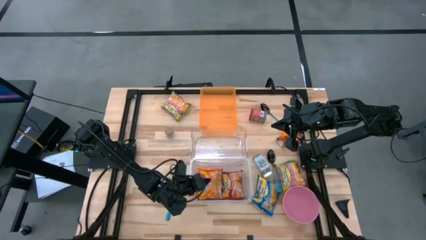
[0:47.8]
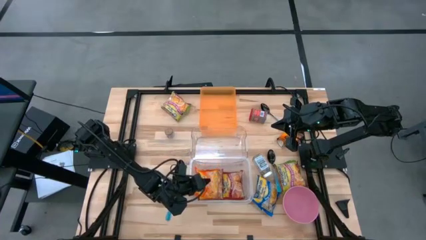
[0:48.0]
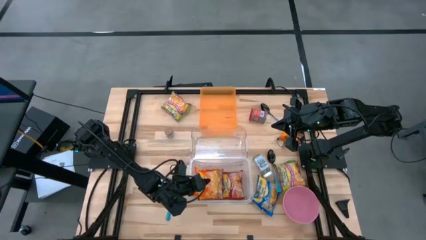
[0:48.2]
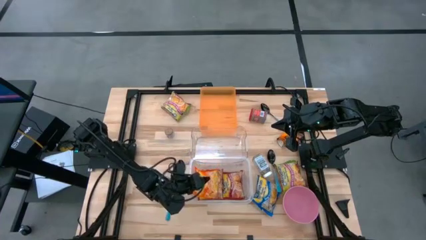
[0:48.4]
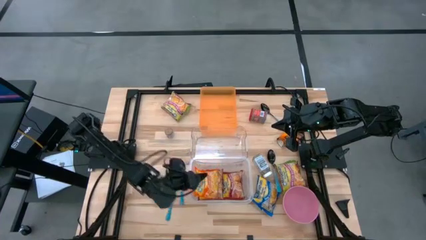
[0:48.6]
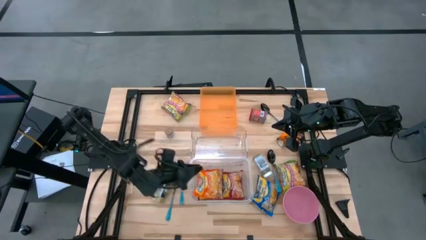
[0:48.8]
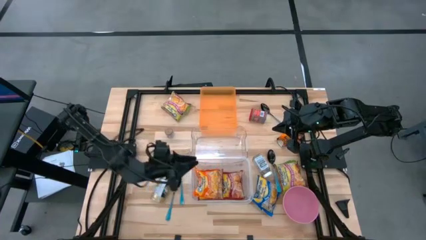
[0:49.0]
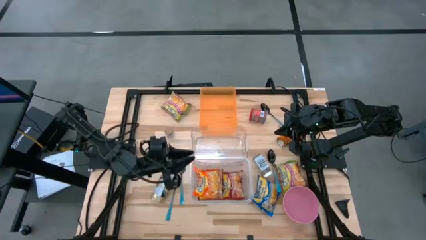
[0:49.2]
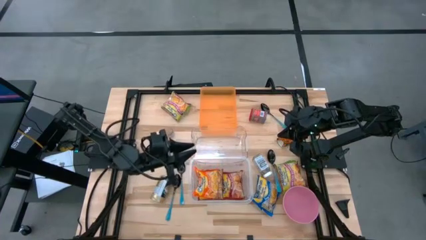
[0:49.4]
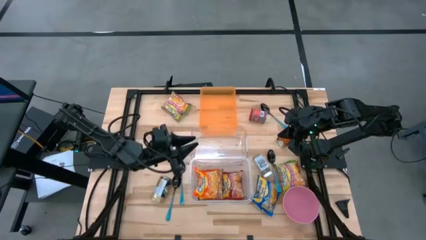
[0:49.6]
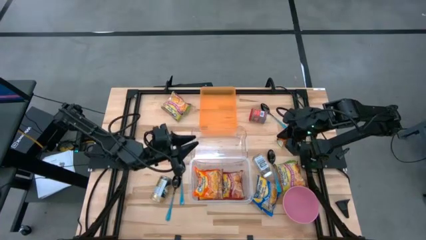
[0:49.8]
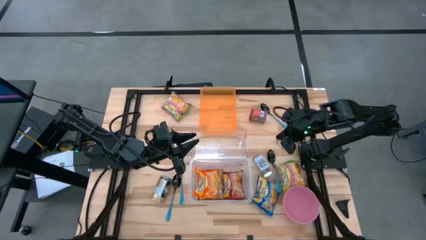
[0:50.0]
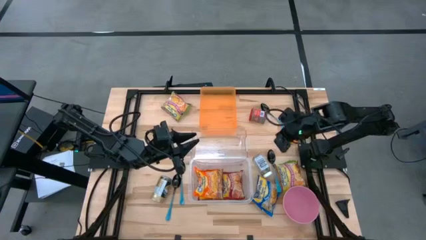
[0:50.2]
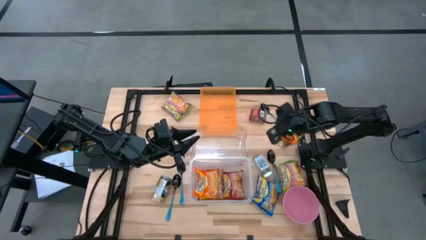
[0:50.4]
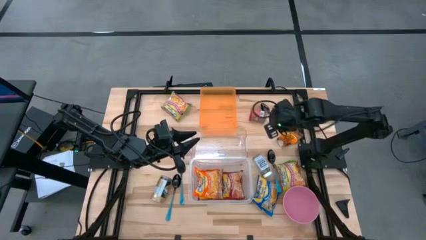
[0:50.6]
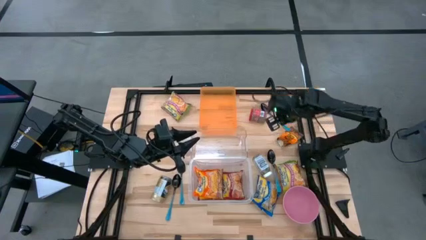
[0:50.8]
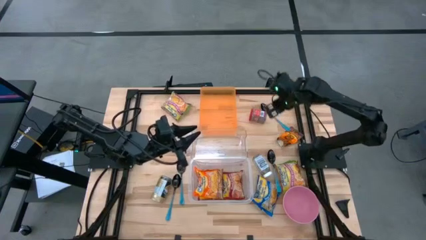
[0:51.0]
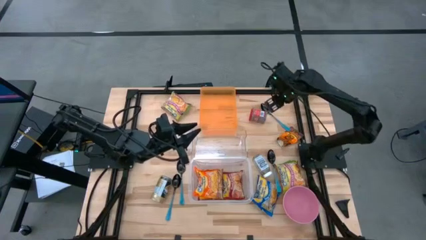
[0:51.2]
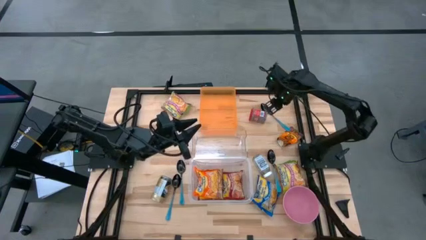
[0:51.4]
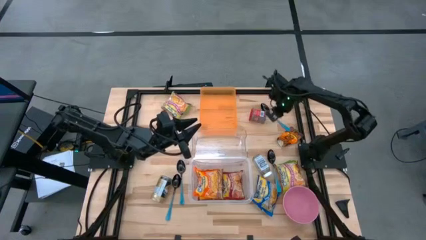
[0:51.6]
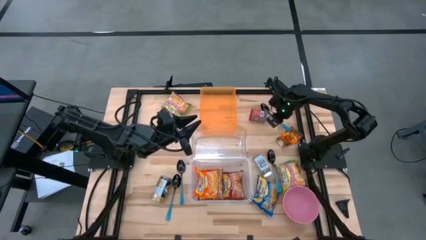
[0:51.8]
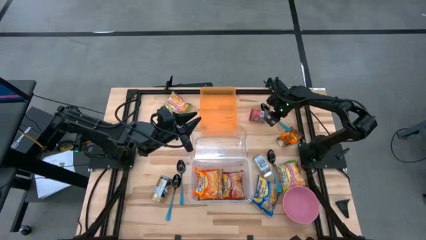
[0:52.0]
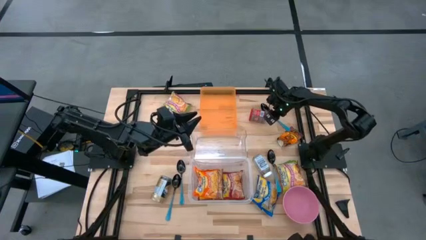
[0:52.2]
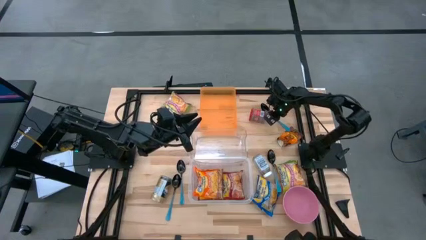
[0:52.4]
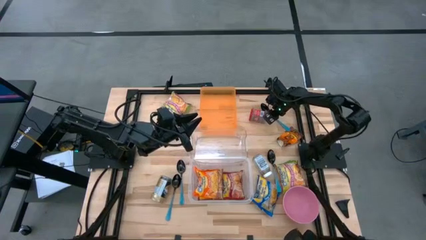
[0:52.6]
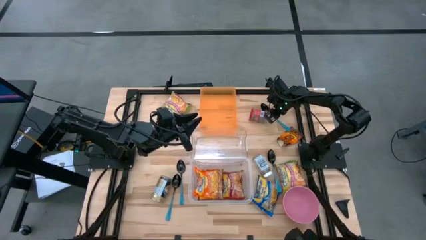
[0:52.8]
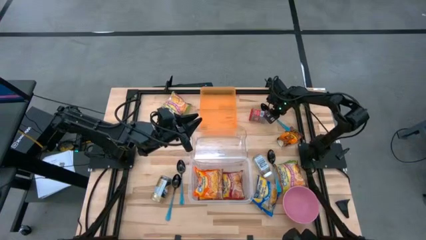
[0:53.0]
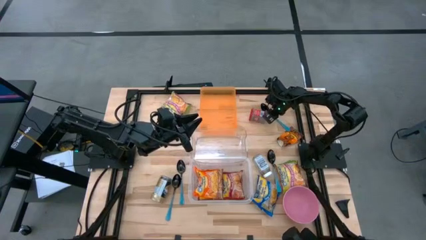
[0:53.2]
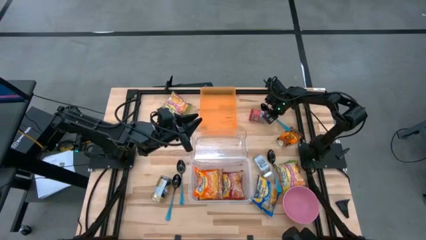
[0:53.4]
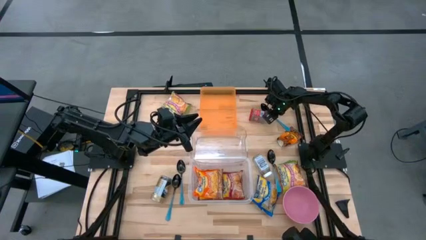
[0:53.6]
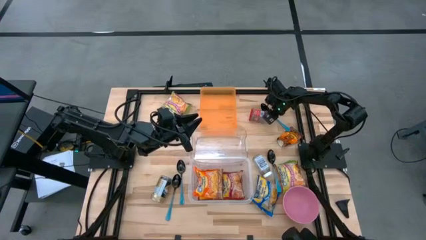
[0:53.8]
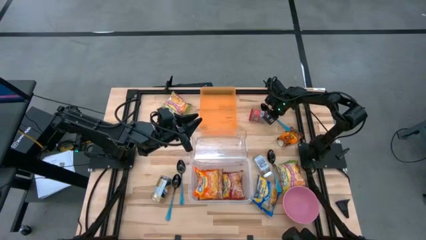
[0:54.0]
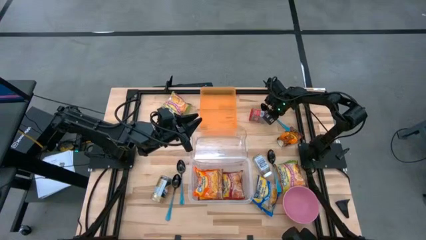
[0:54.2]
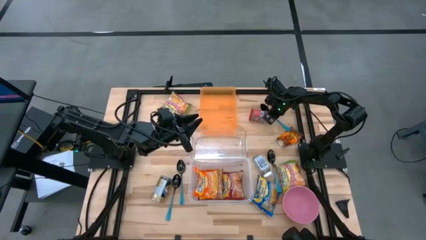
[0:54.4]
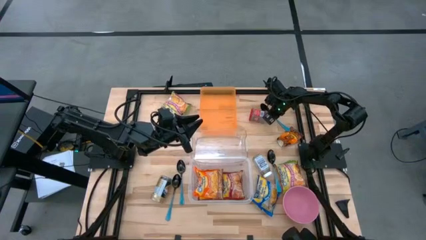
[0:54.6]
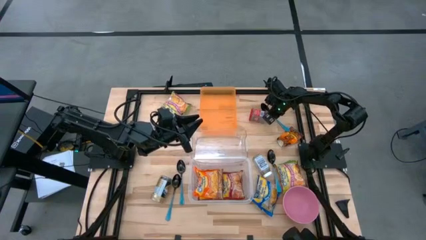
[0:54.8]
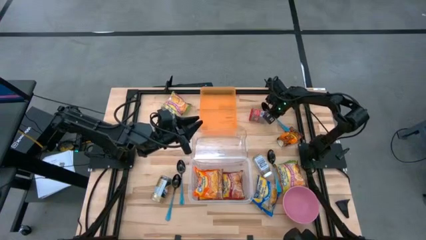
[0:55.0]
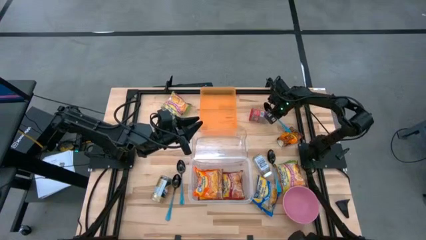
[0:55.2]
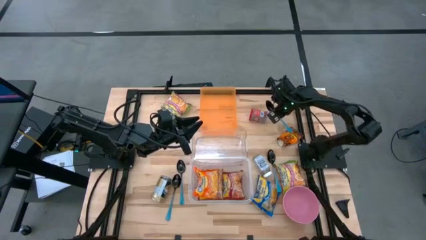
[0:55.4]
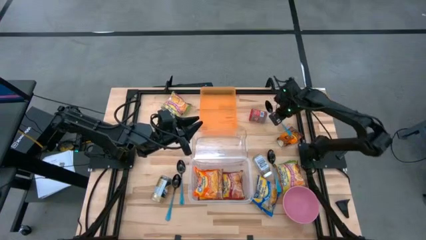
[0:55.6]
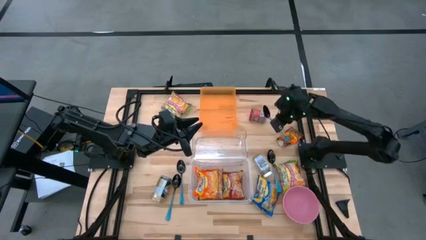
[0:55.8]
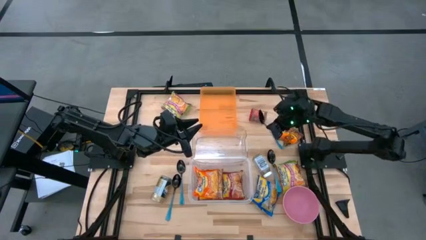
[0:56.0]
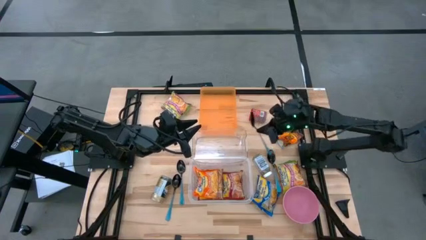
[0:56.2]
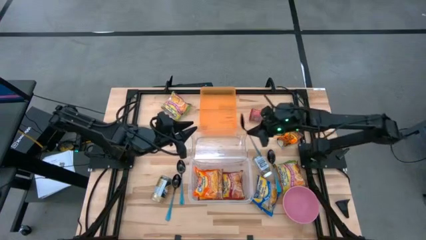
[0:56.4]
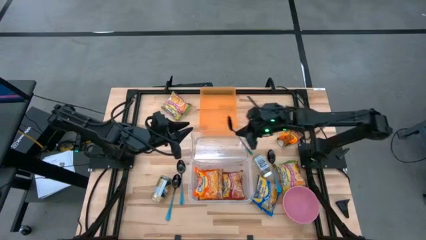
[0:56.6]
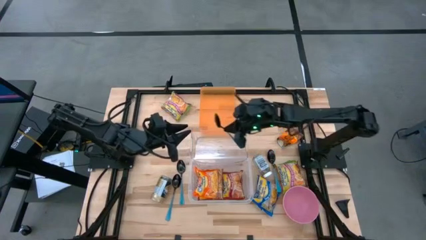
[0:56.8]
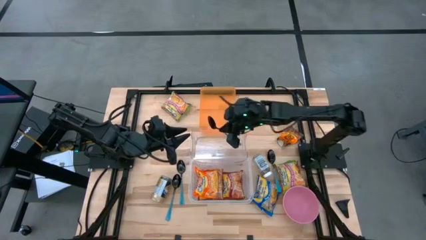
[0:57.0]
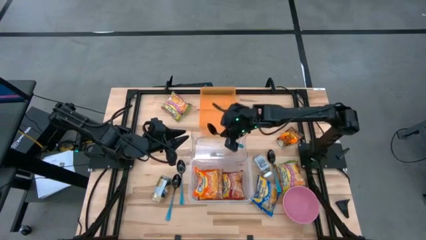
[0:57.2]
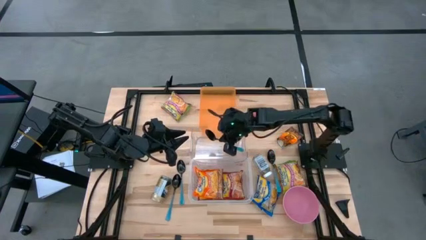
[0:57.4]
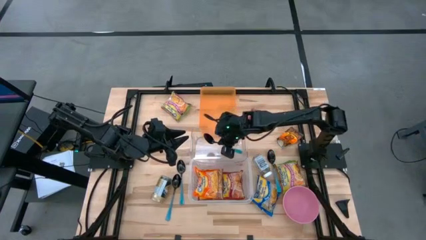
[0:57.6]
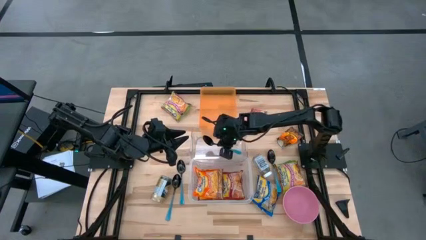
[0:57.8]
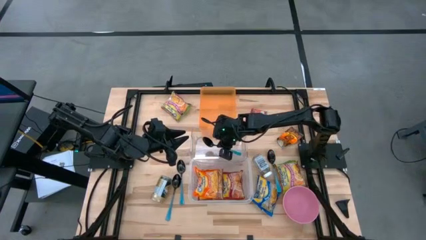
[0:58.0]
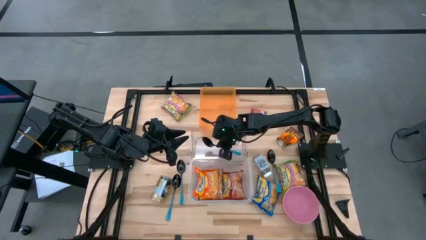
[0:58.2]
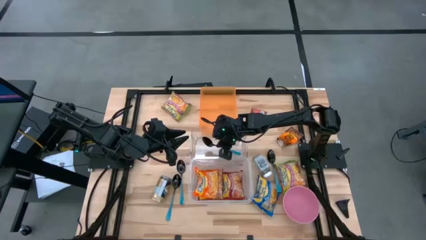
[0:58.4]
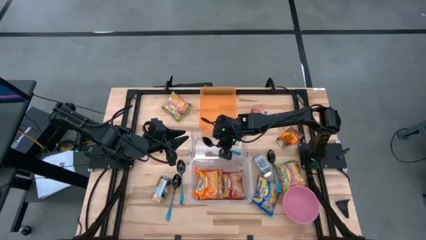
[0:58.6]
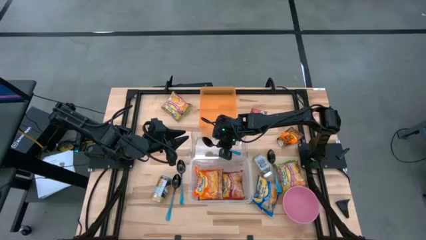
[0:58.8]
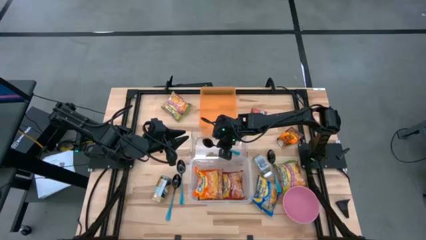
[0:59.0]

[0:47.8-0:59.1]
Task: Pick & Place Food Item
Put the blue spoon into the transparent bin

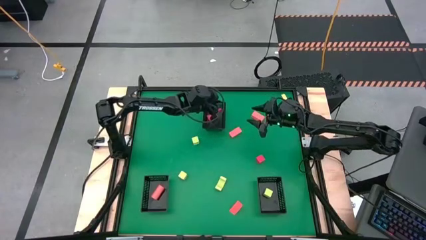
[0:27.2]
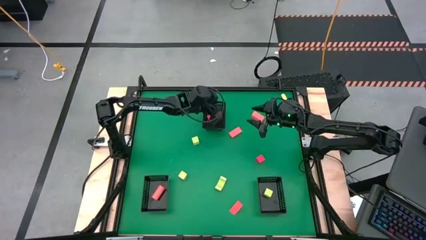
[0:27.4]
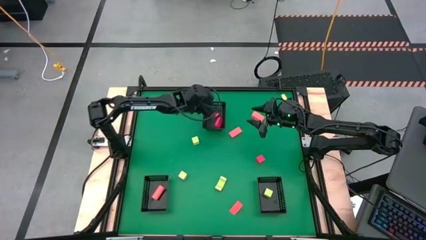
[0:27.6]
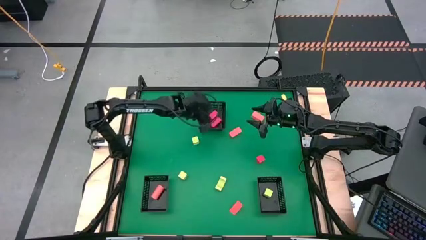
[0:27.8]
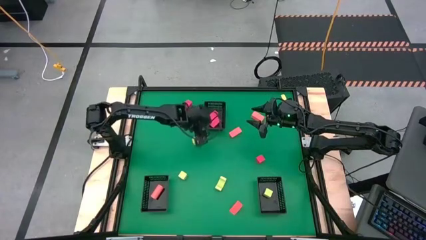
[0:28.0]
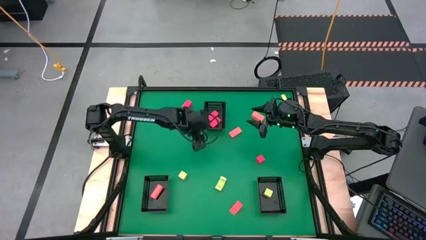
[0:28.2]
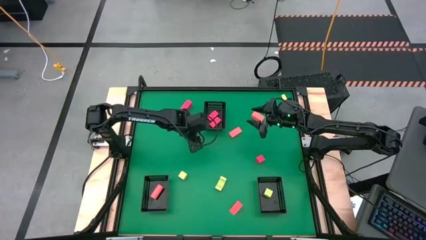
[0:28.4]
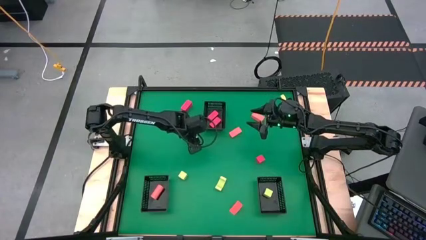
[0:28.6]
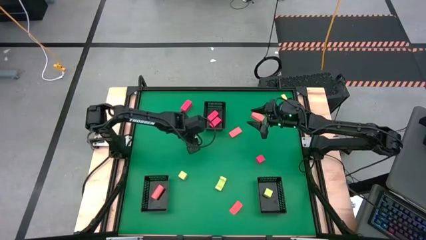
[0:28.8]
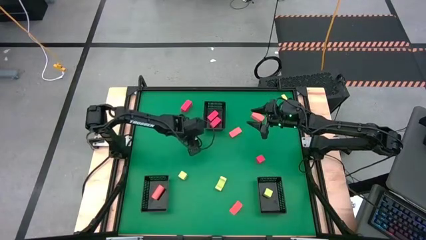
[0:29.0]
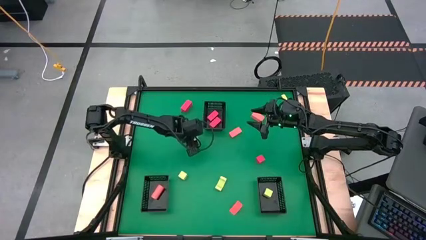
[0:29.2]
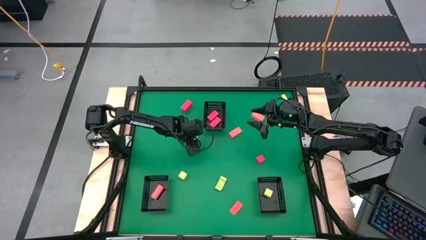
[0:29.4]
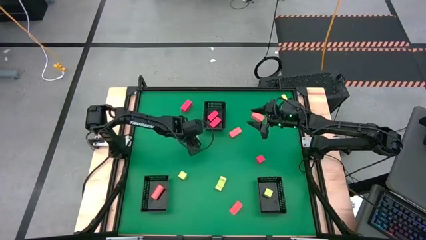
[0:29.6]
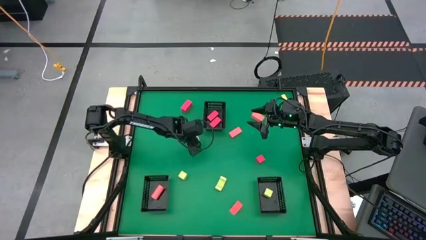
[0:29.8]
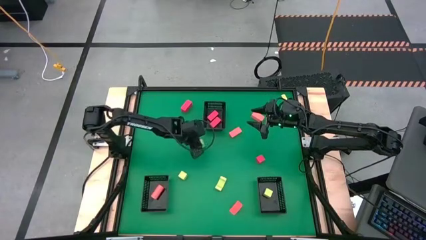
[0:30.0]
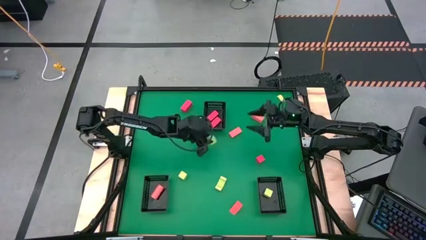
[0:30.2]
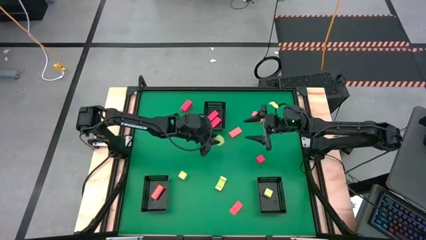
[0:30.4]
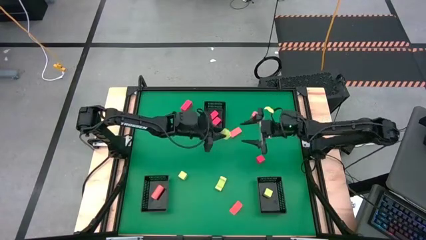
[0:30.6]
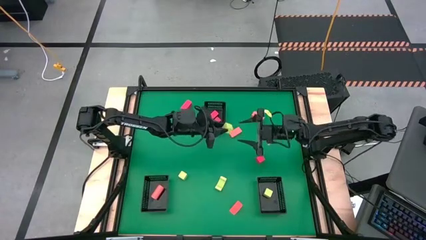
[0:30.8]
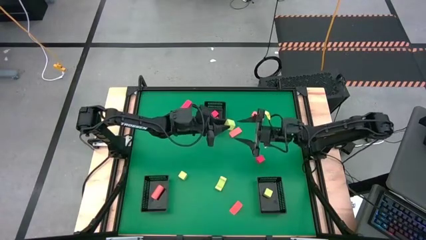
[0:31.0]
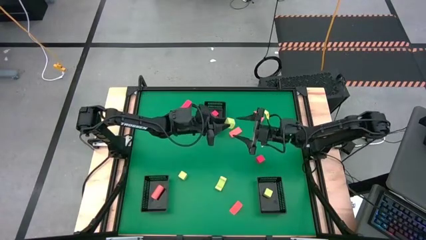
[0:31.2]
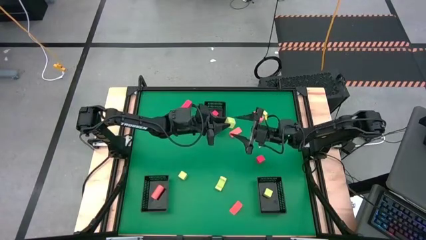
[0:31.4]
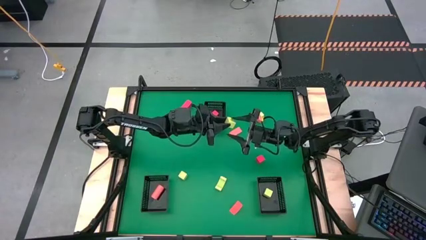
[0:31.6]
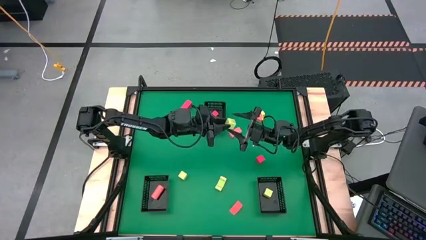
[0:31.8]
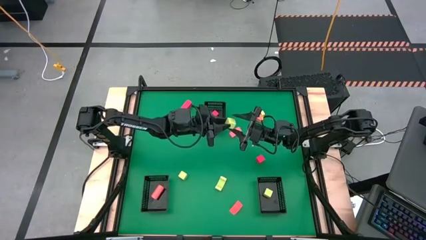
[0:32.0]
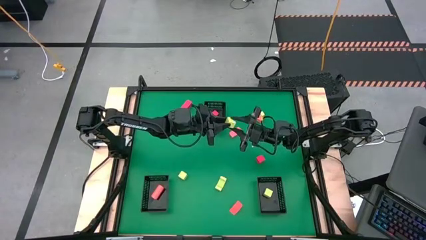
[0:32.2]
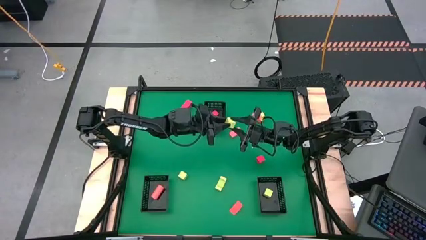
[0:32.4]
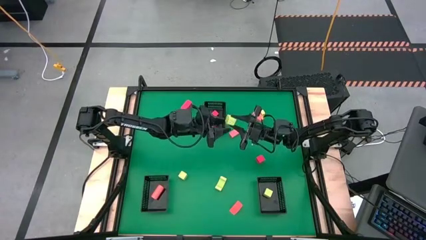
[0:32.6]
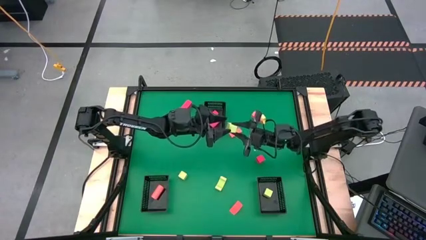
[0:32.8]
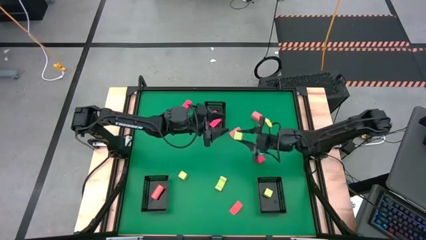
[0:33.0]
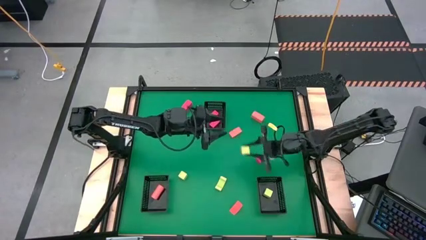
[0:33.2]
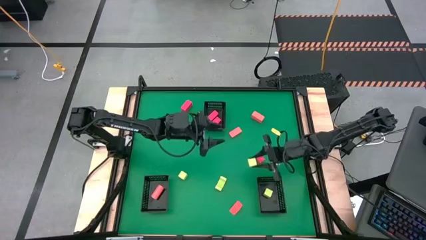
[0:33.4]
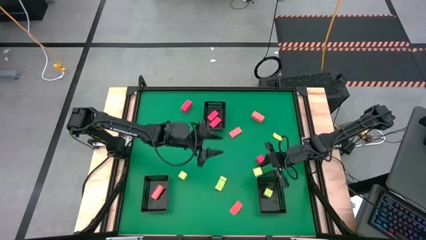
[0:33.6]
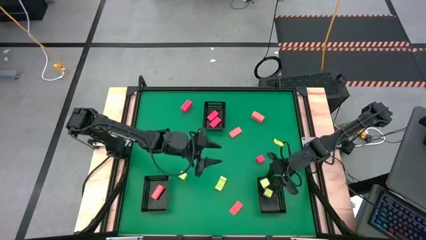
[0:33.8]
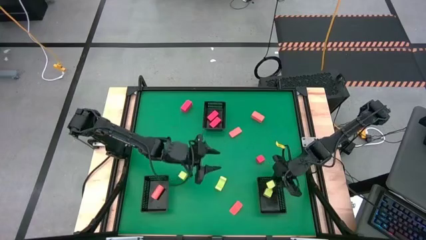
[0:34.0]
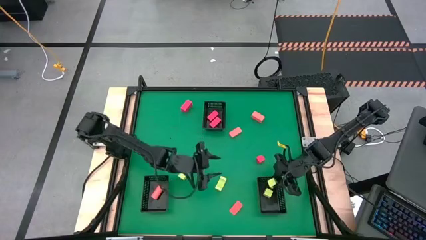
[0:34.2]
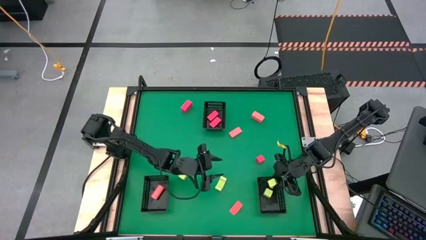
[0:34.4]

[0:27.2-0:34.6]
Task: Sort & place blocks by color
Put the green block into the bottom right black bin
